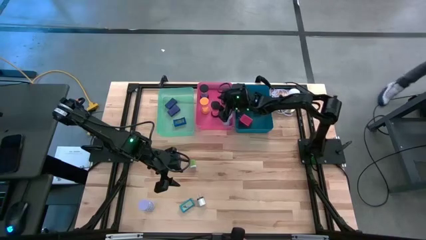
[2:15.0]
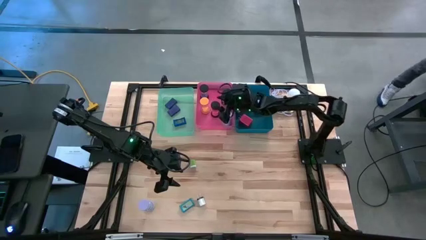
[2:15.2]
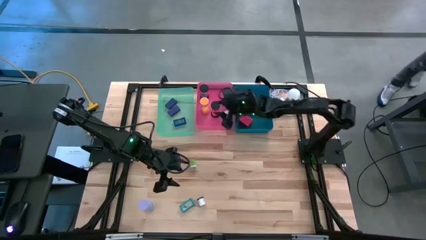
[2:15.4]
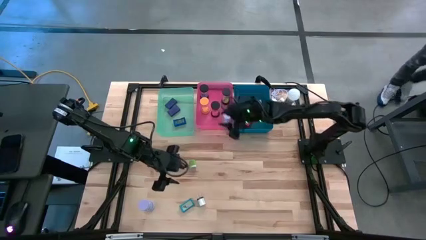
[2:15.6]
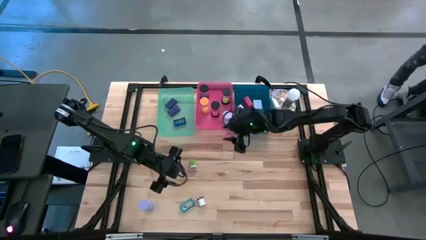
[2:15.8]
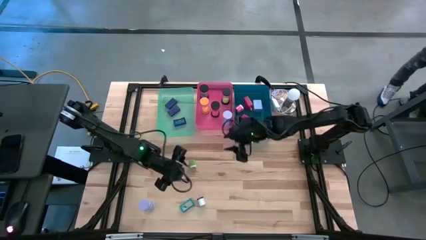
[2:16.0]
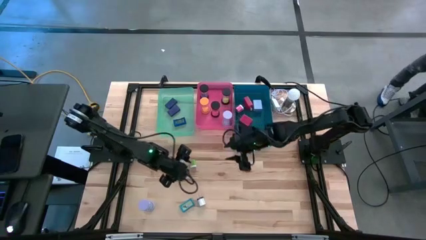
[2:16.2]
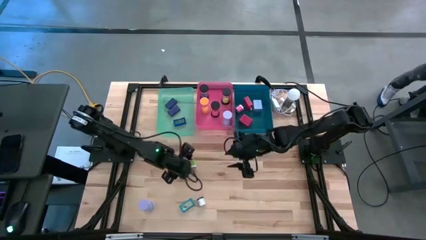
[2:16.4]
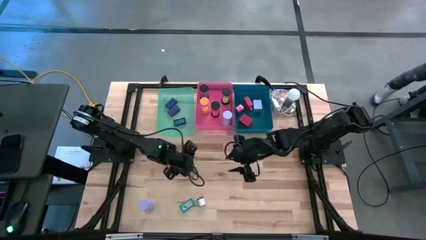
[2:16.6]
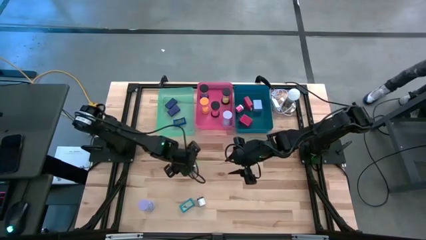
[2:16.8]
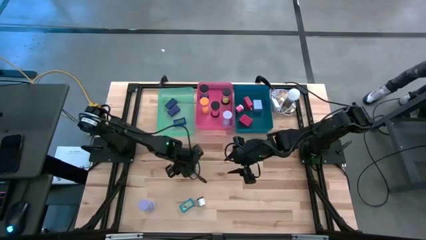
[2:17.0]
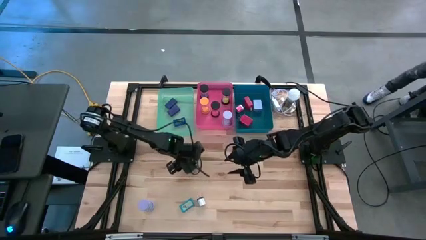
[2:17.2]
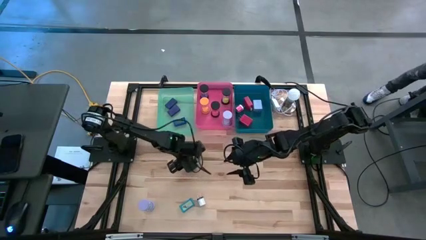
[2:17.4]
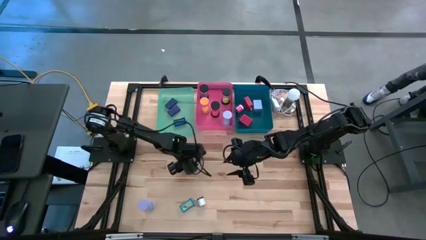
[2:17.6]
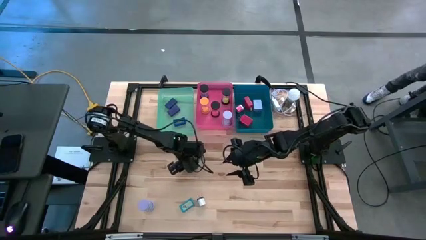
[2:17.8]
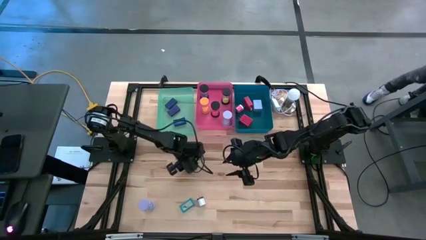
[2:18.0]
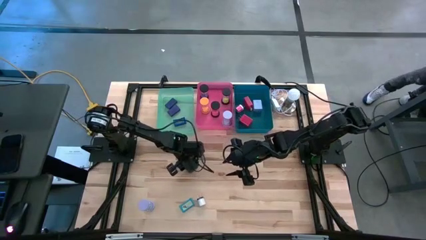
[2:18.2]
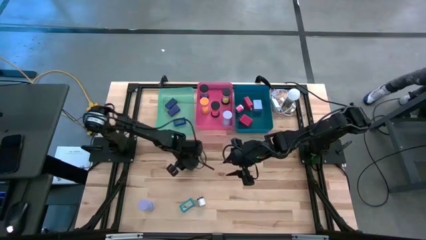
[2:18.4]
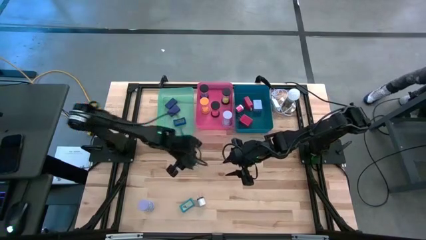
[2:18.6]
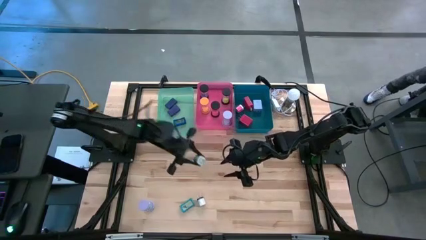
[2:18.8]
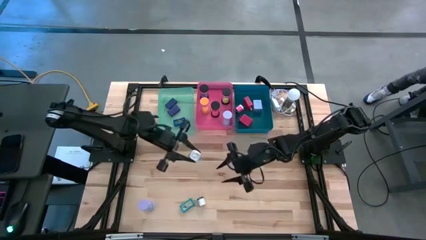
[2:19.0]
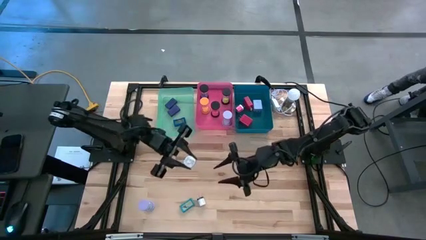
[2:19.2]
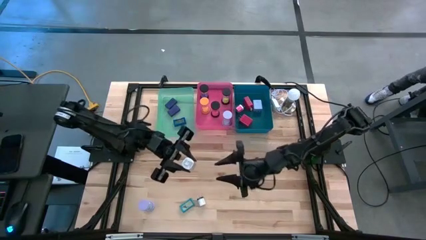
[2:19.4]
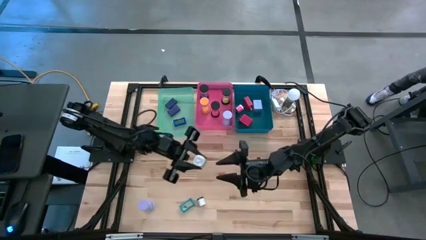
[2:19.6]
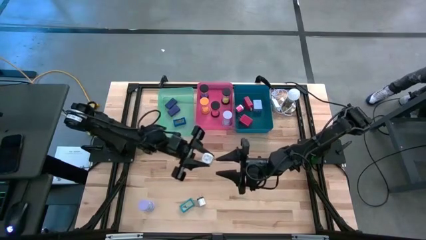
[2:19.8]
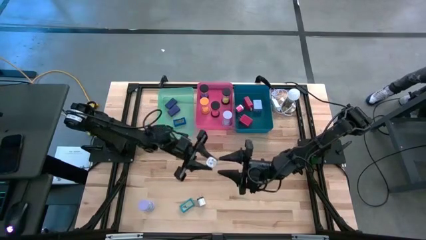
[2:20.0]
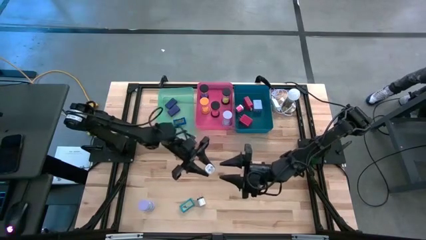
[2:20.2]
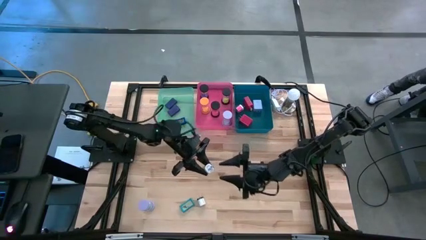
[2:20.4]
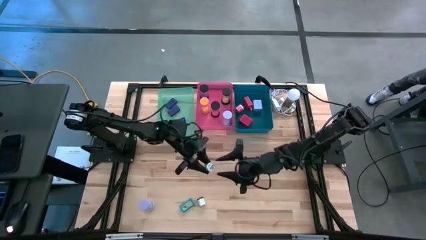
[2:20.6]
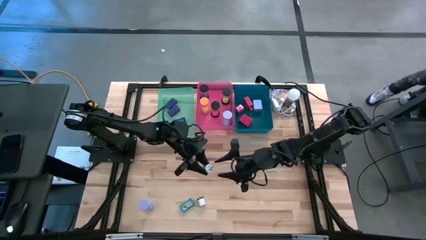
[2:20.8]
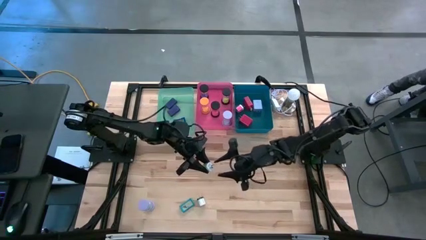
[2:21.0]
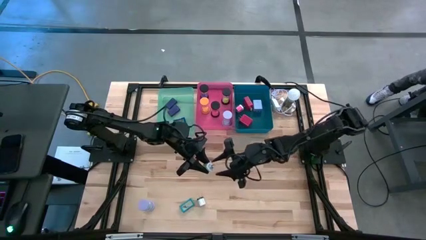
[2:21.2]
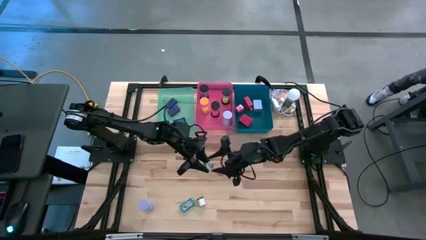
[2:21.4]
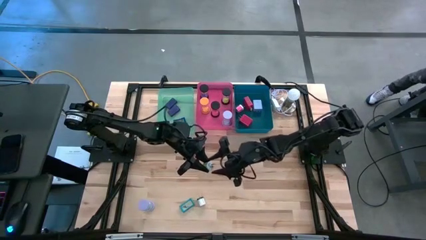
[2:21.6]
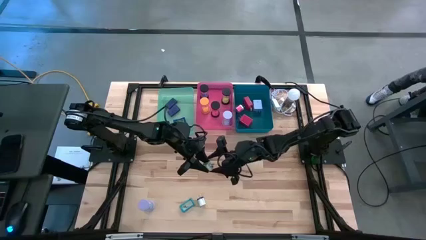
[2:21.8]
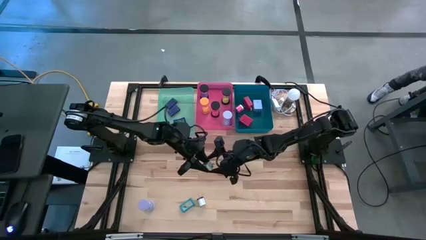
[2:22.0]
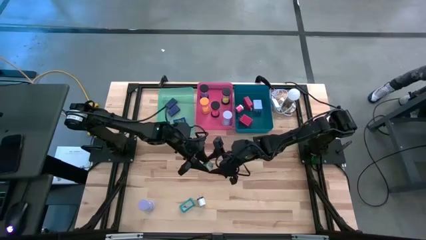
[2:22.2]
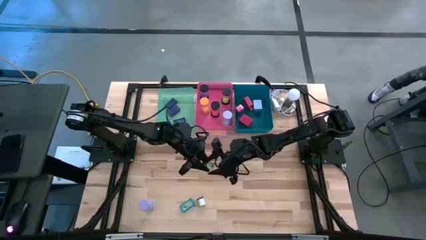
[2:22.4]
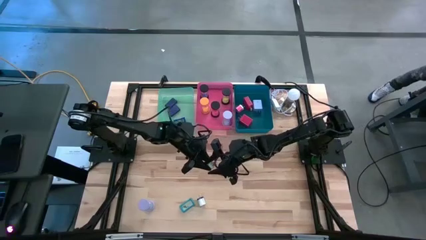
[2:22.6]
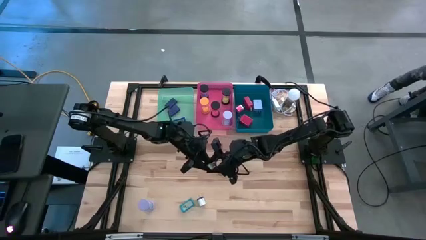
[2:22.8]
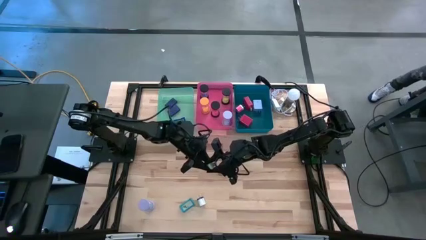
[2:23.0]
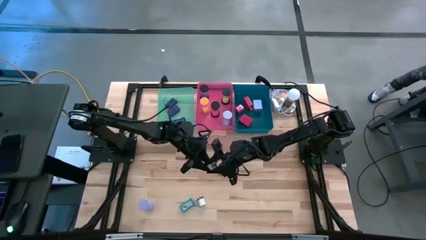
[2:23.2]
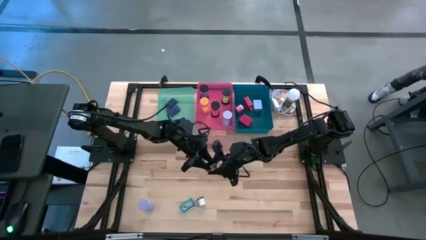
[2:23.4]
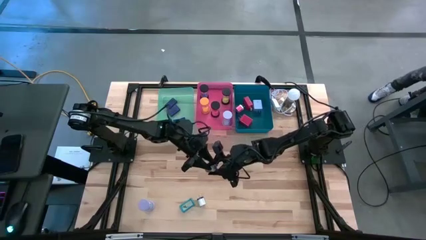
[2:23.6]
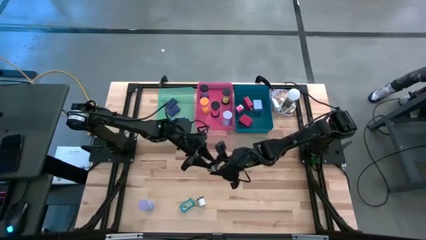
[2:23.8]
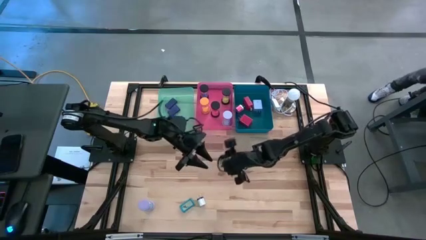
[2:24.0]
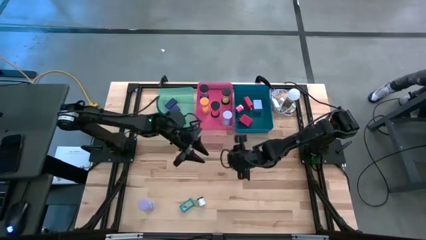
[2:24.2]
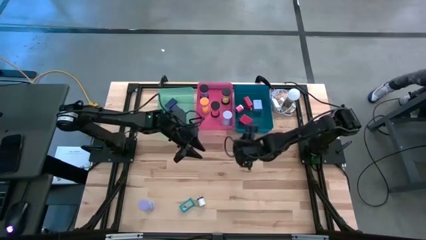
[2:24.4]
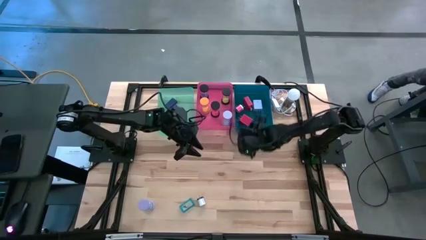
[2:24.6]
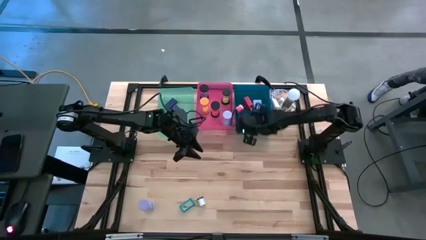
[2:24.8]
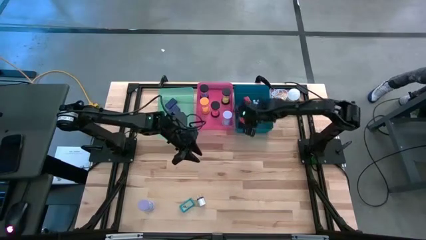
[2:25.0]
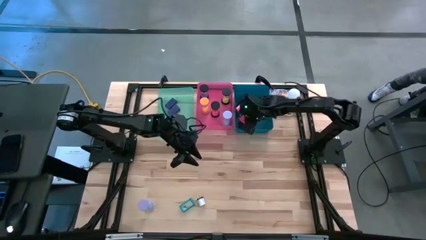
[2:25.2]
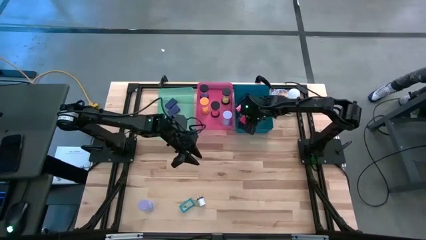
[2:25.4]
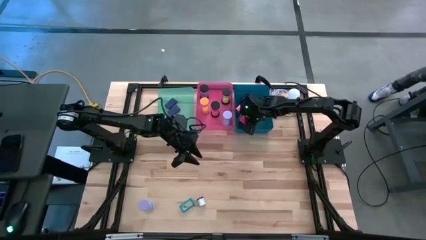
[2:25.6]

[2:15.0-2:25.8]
Task: Pick & Place Office items
Put the green charger adapter into the blue bin

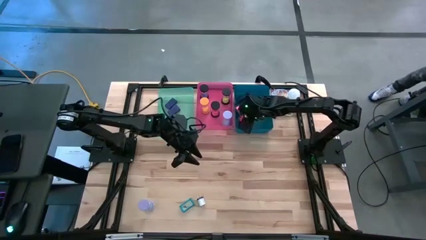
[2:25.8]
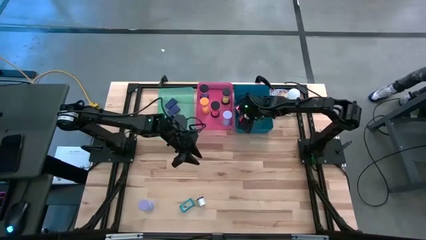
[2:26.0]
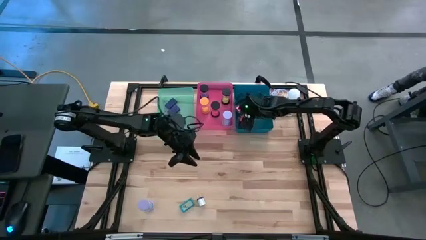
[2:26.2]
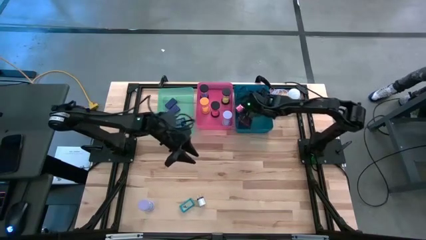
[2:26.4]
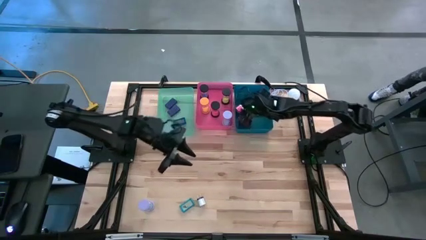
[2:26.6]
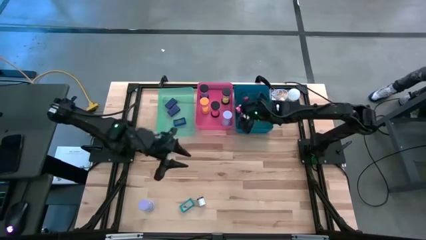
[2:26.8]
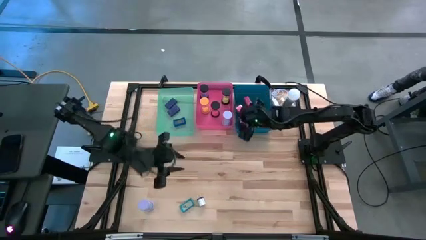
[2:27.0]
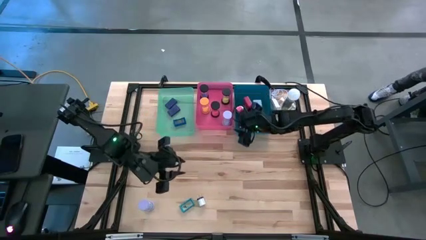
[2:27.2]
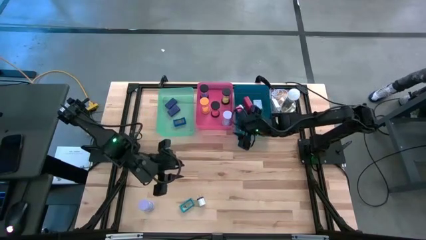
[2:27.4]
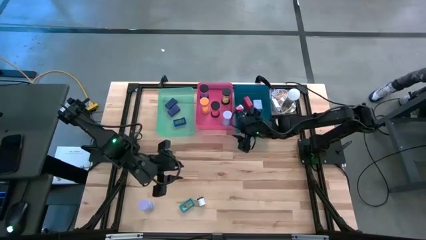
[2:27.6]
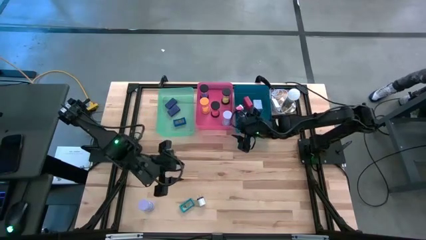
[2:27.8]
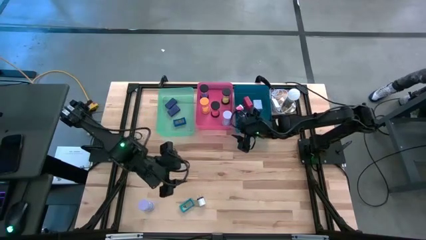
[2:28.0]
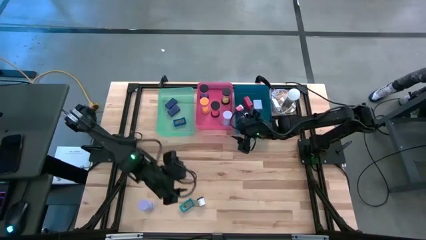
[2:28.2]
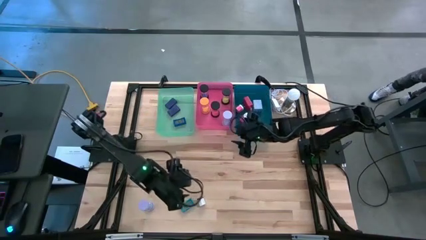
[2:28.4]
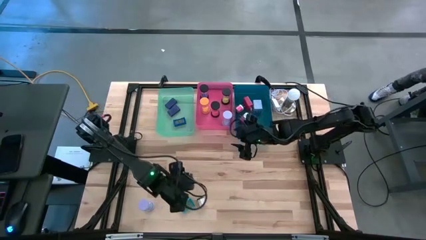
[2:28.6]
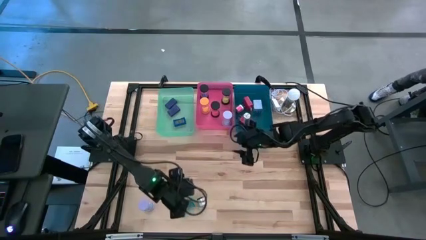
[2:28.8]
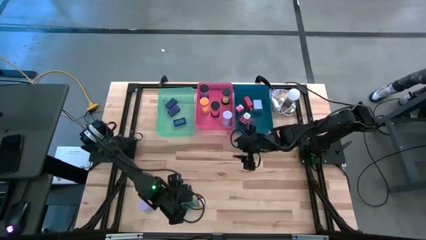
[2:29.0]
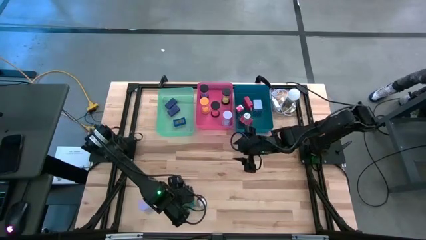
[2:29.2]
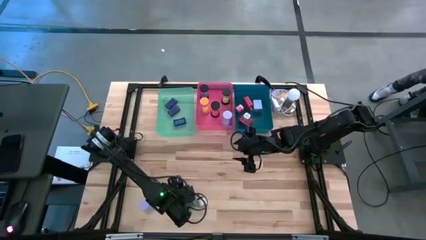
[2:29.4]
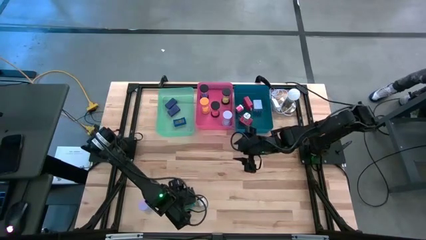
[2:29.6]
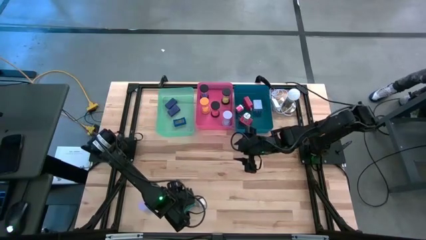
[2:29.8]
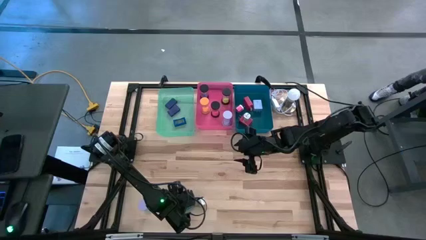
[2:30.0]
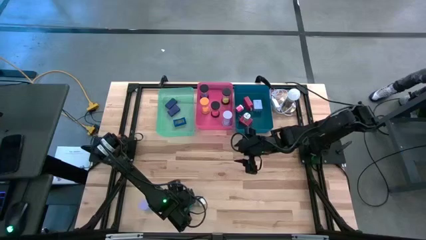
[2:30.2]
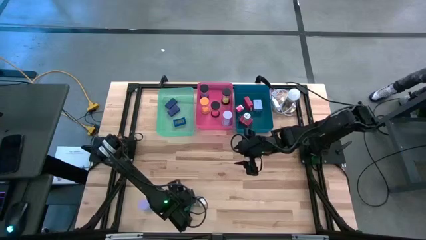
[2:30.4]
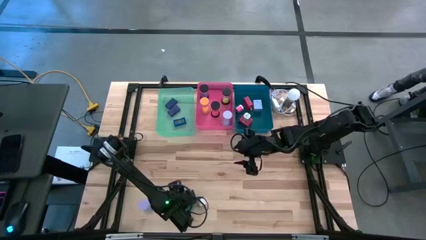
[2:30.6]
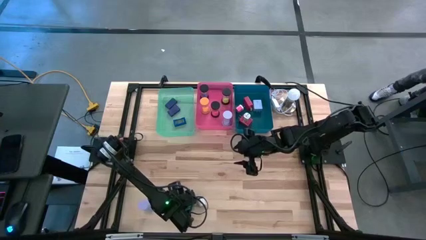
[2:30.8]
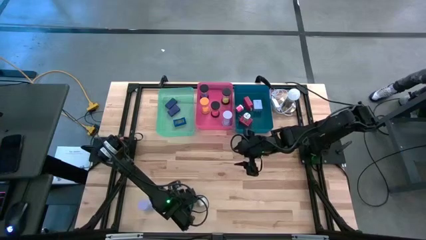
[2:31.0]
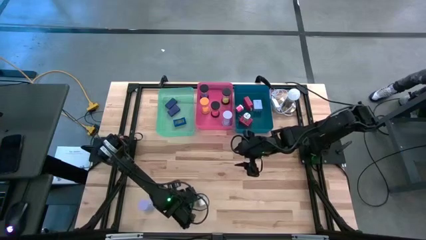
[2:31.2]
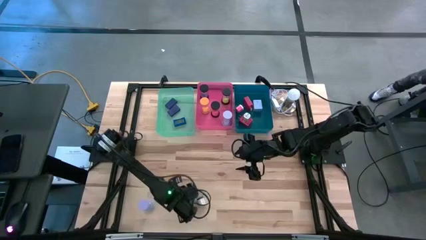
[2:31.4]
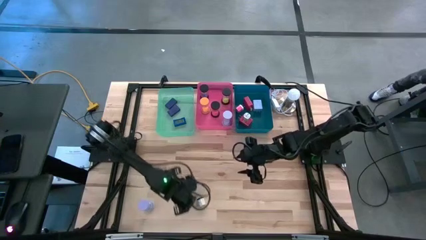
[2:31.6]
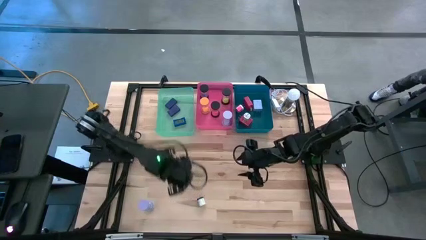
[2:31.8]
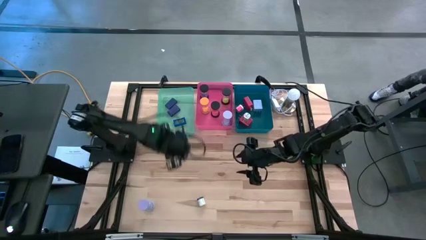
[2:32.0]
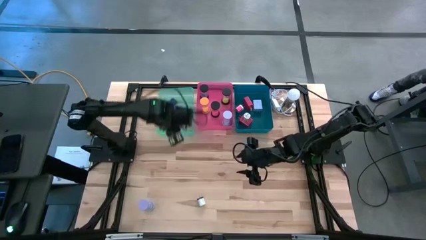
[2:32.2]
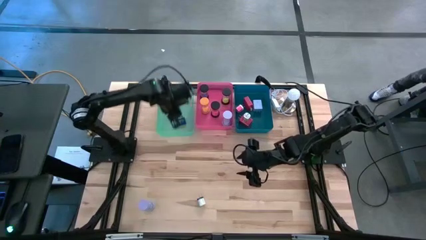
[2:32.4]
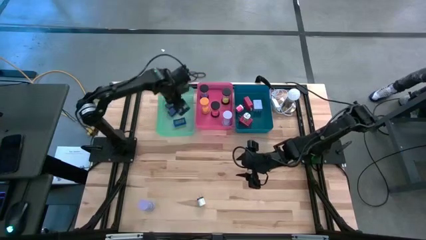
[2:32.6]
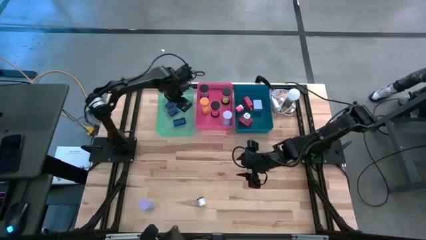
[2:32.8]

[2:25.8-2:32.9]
Put the light blue digital clock into the green bin
